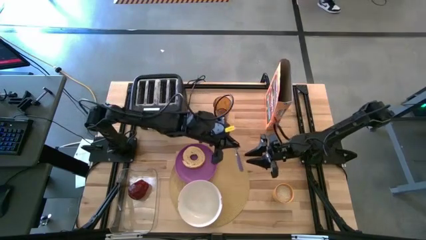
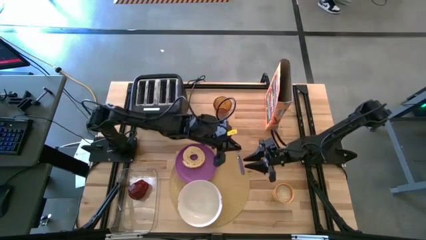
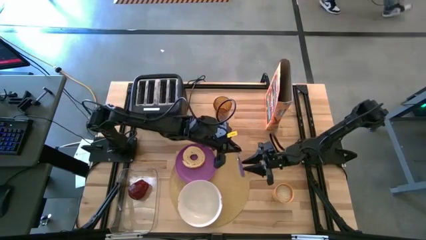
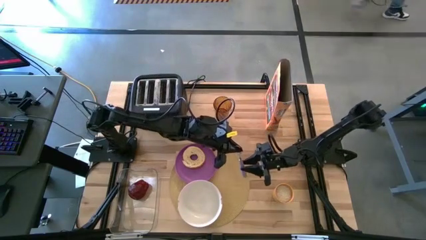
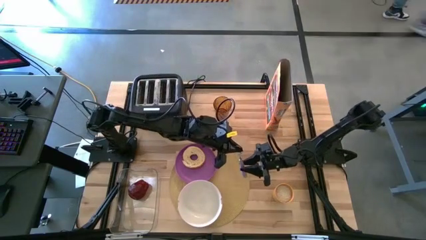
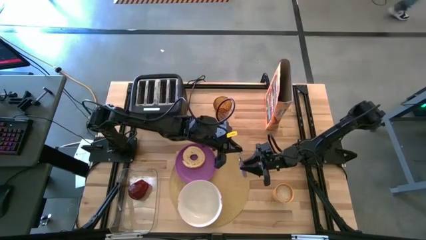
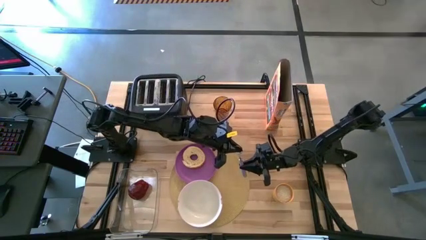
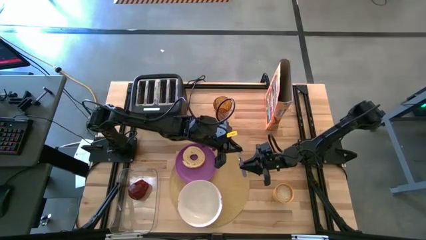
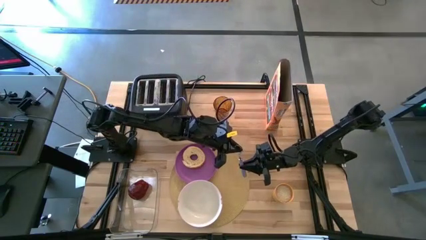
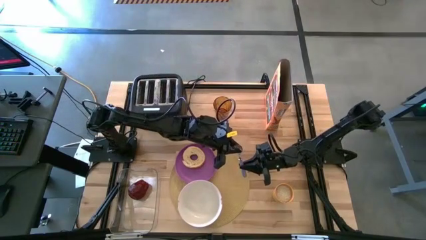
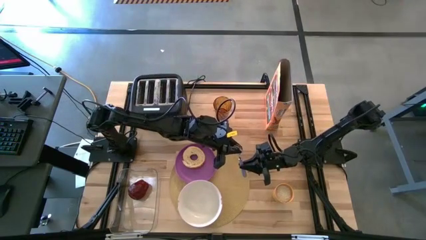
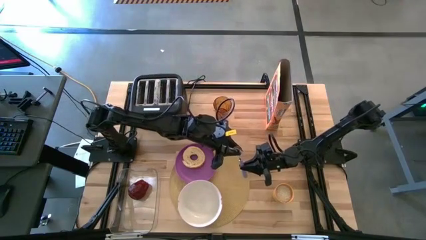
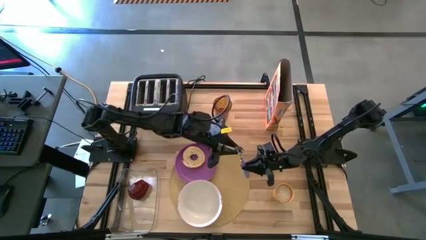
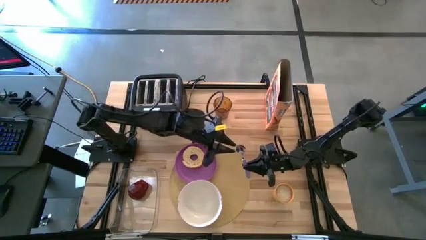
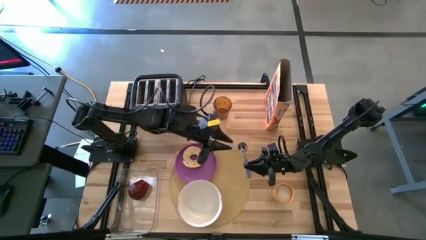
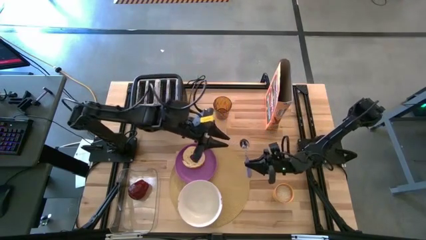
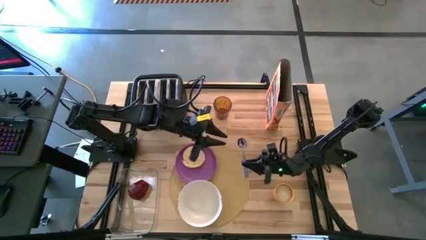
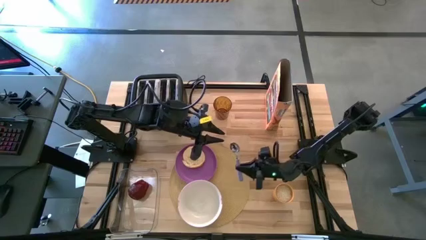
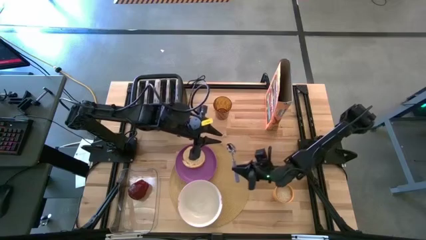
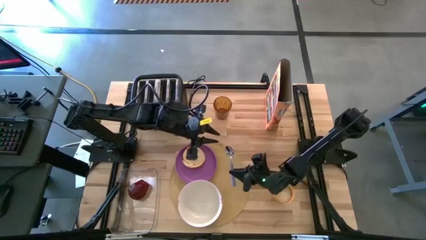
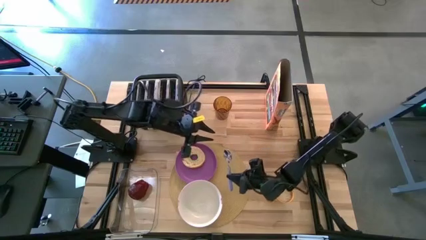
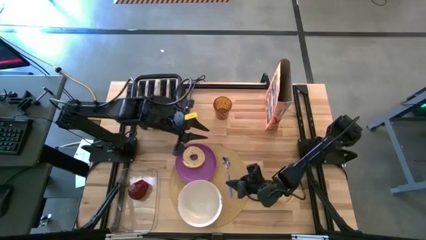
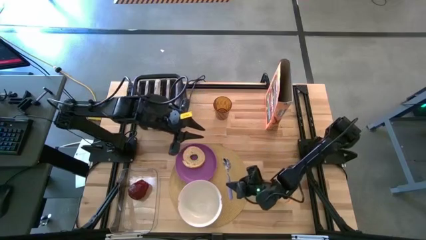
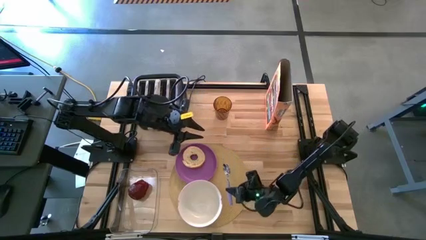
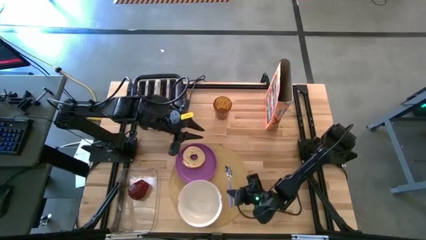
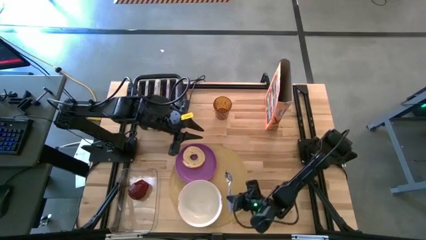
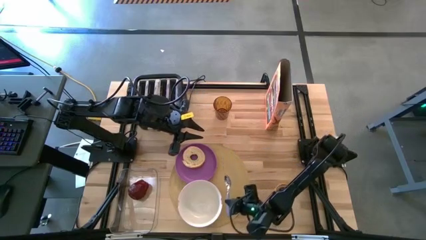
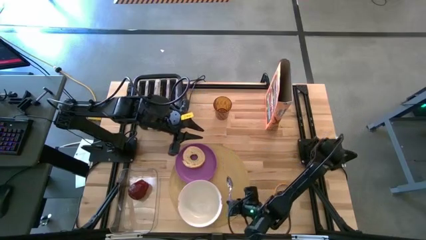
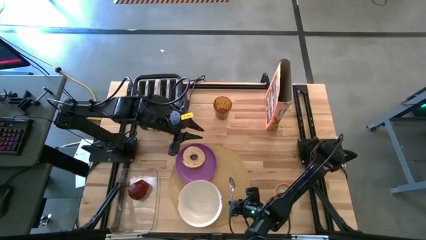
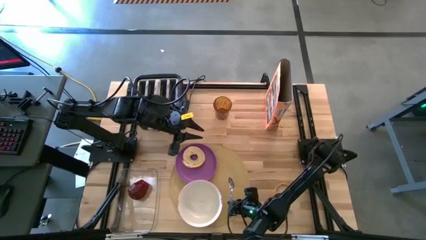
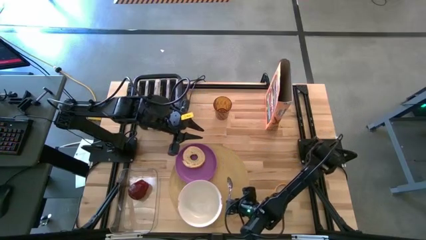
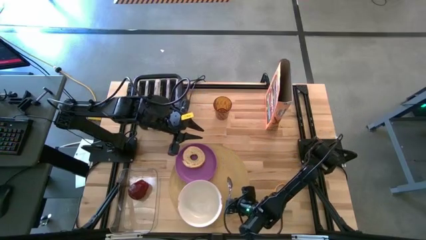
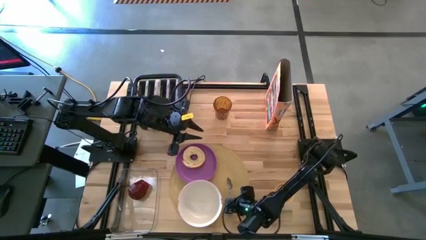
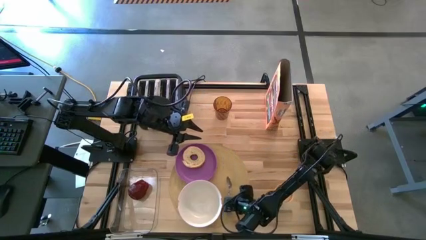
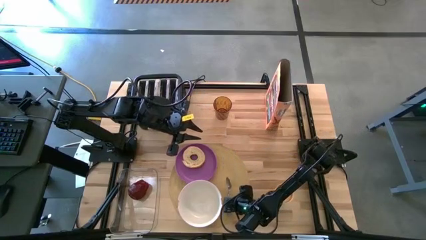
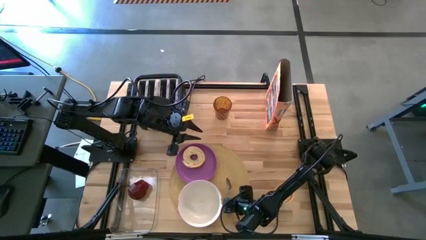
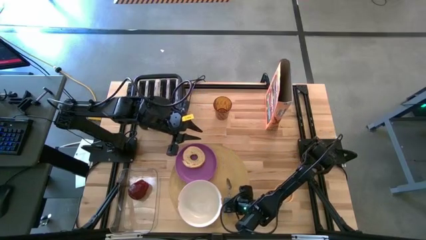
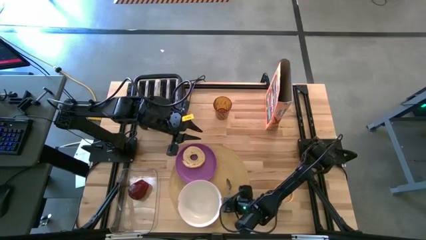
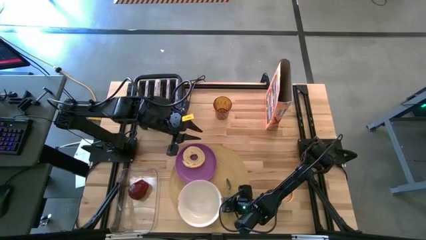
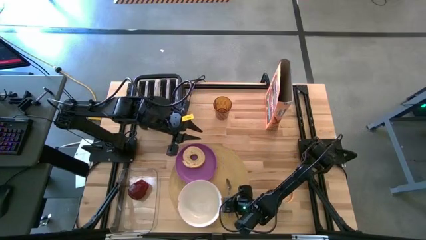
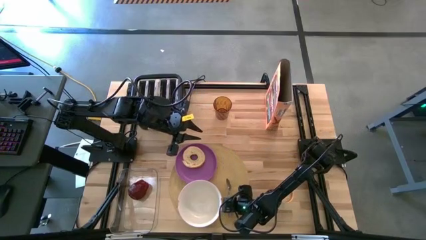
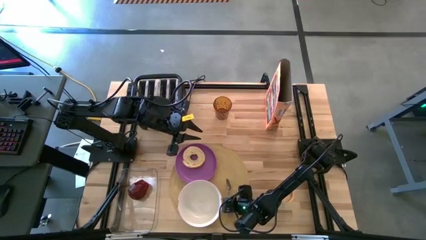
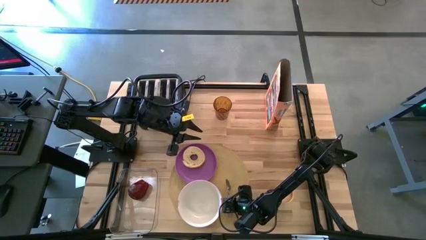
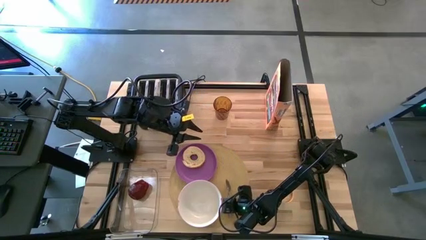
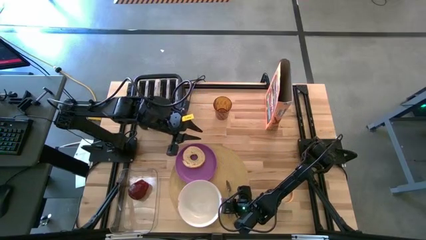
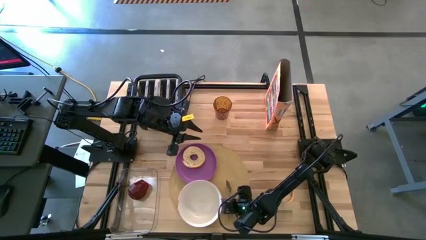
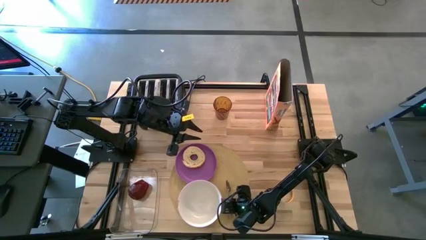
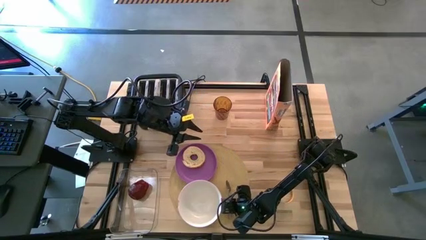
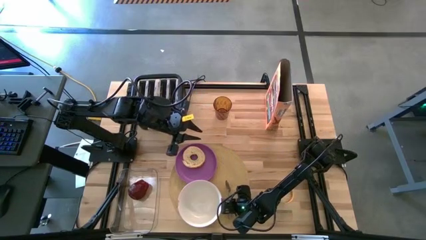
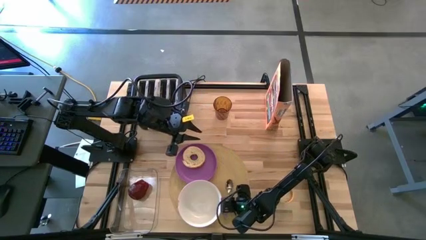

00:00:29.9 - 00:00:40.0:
Task: Arrange a breakfast setting
Put the spoon from the glass onto the placemat to the right of the white bowl

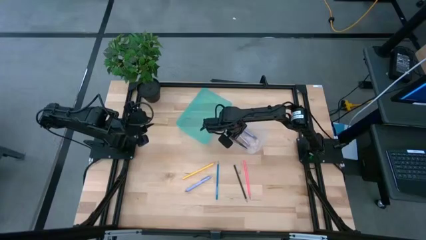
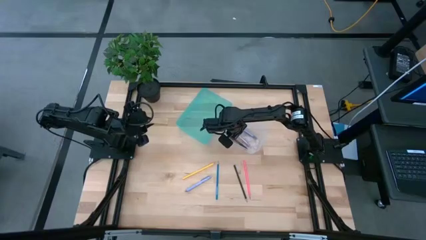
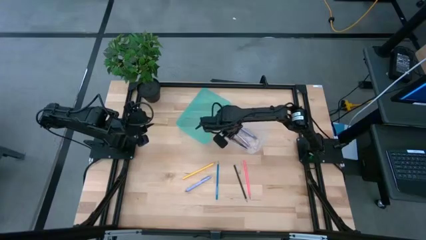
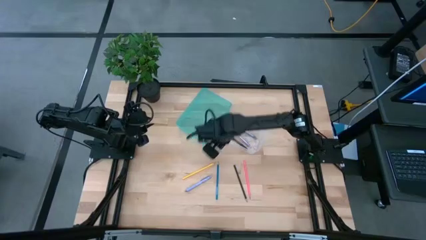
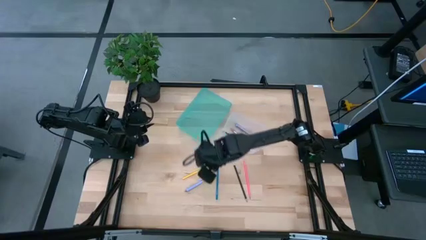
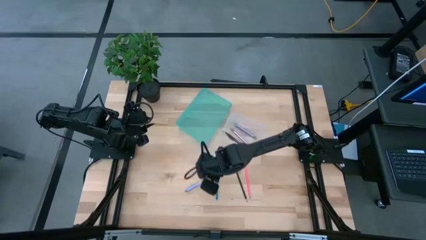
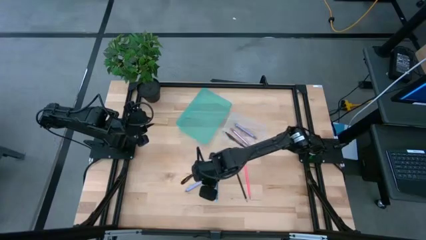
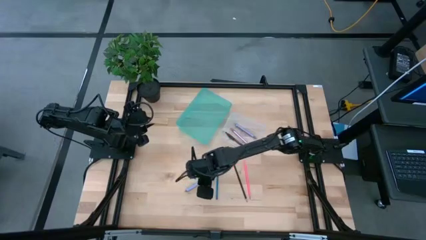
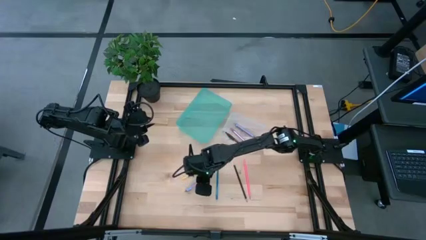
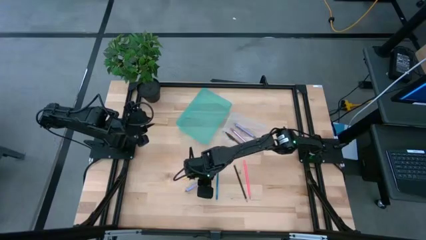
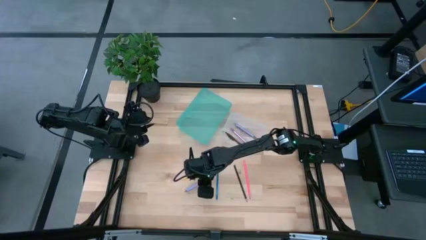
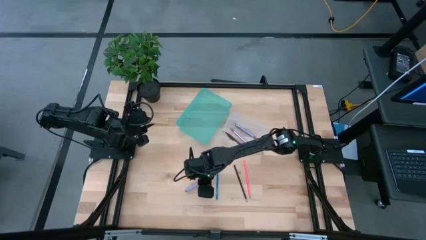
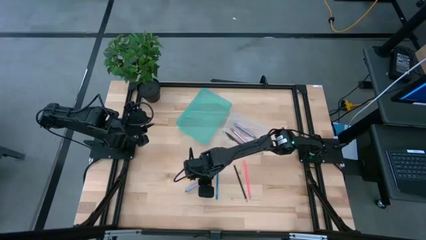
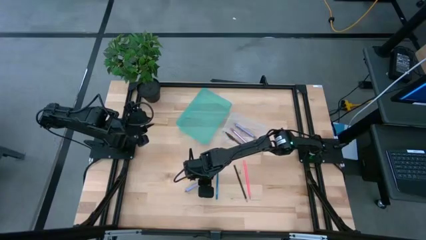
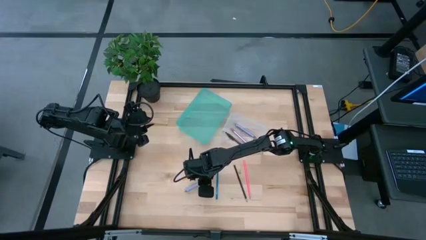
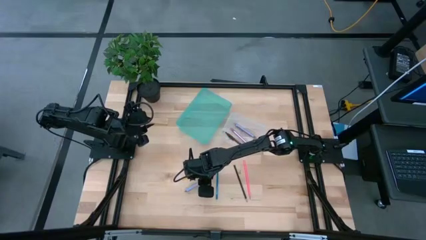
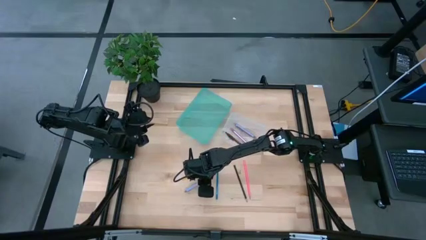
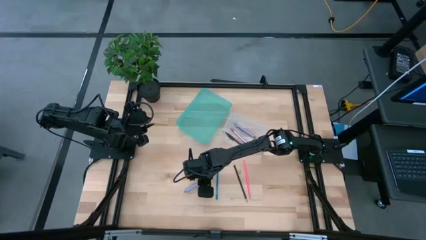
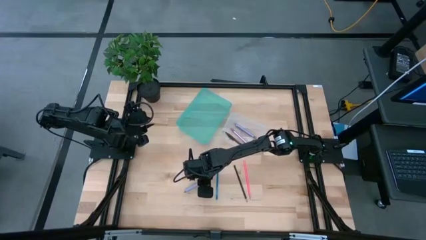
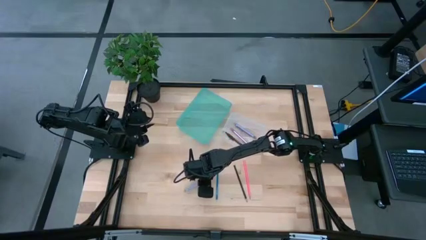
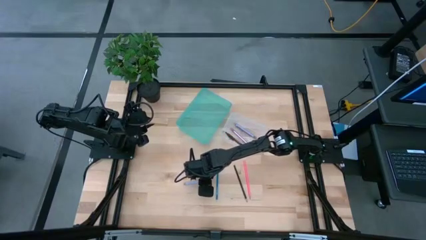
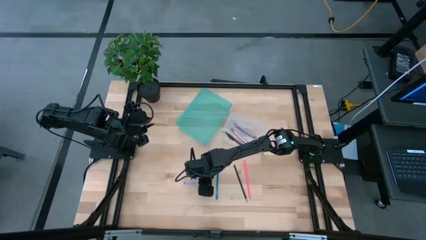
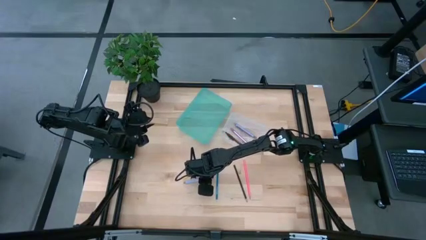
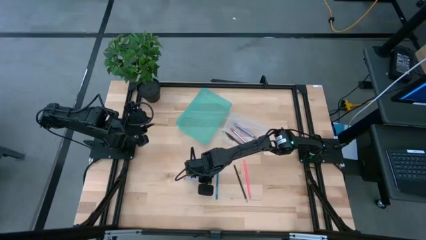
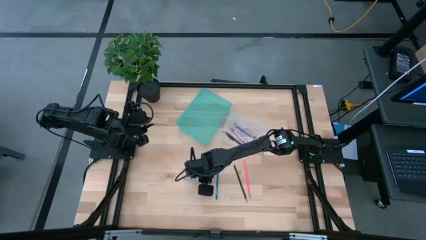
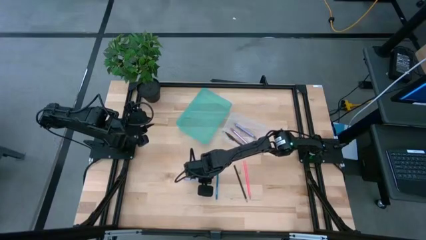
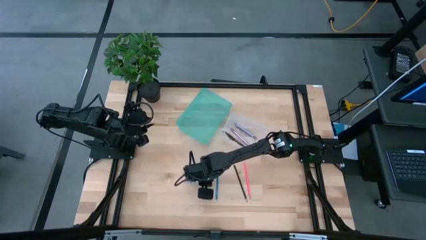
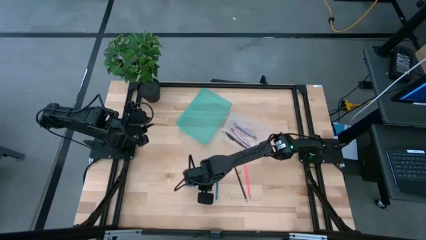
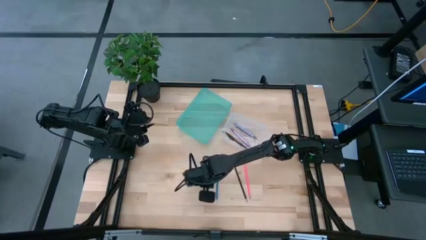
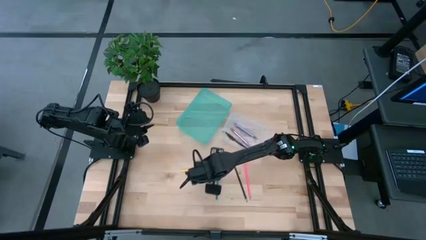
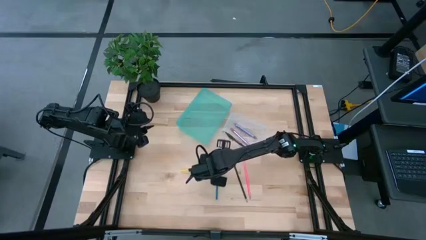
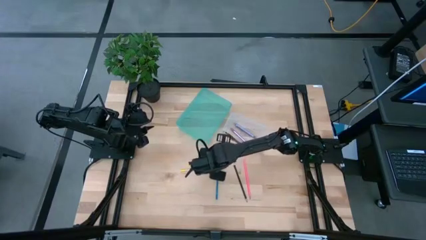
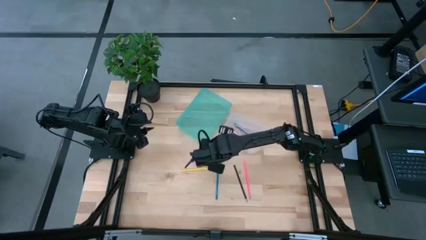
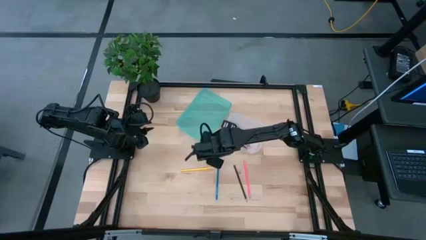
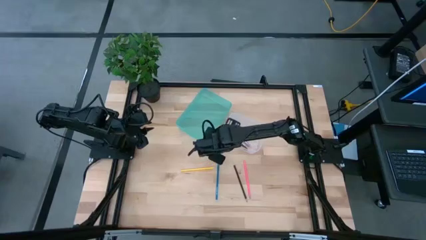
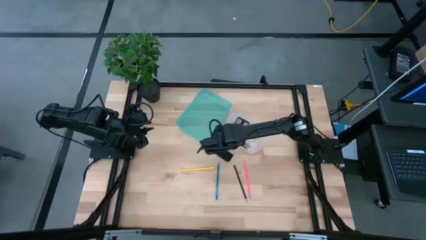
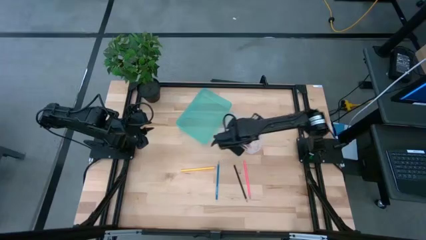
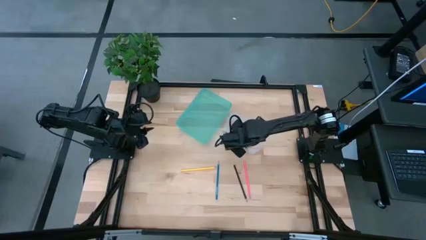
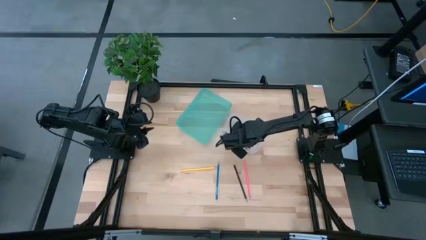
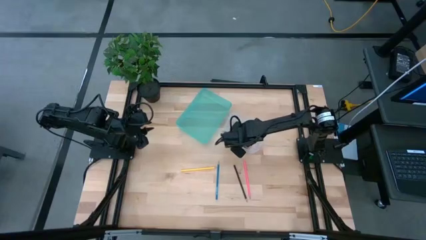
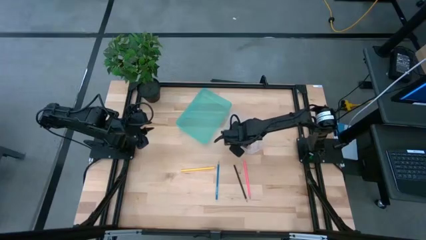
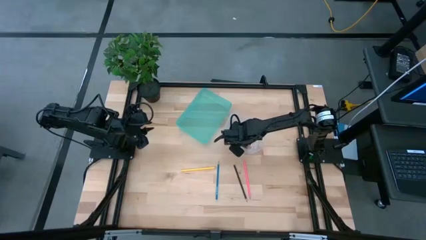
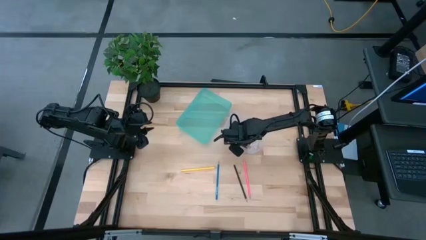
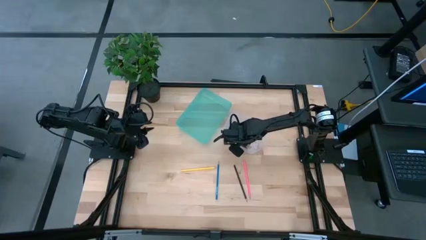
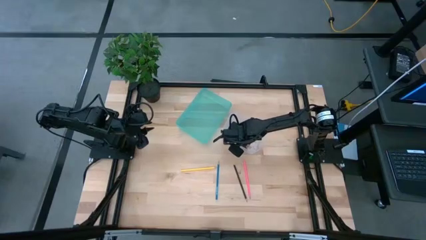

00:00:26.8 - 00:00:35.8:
Task: Sort pens & pencils
Put the light blue pen into the transparent bin
